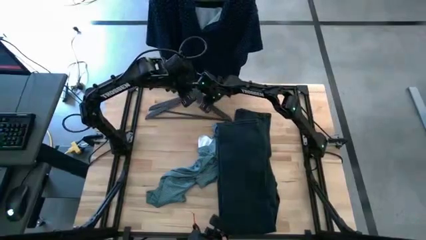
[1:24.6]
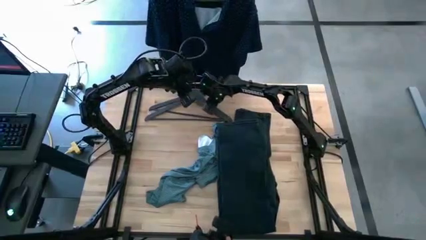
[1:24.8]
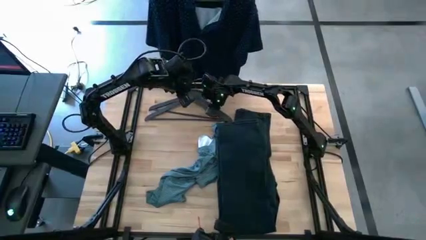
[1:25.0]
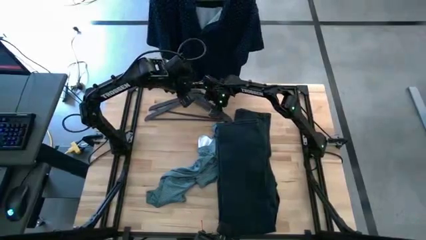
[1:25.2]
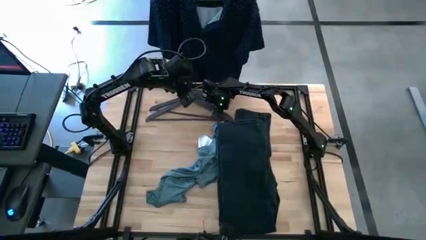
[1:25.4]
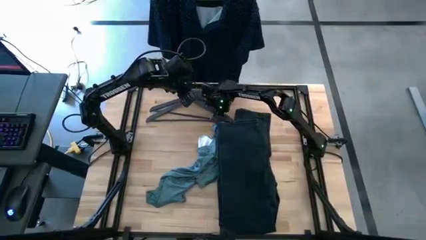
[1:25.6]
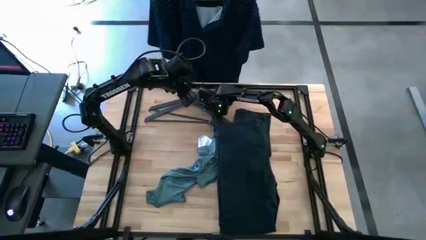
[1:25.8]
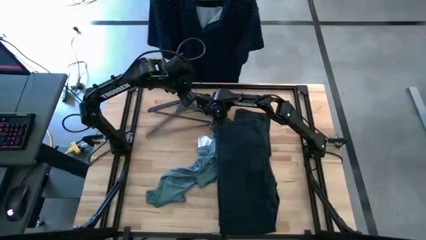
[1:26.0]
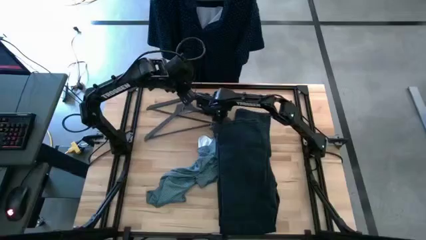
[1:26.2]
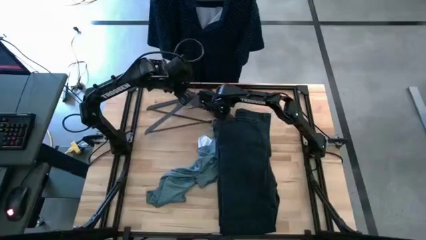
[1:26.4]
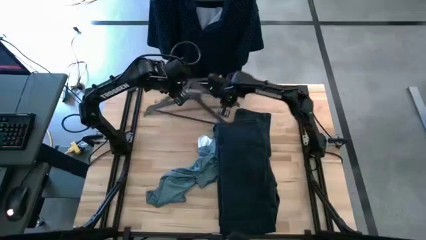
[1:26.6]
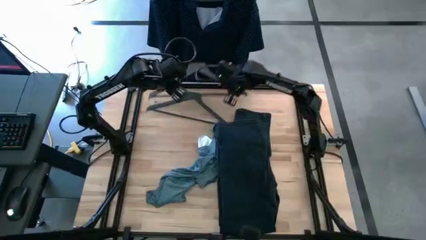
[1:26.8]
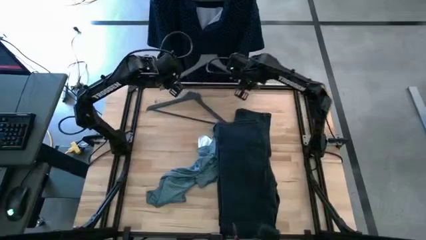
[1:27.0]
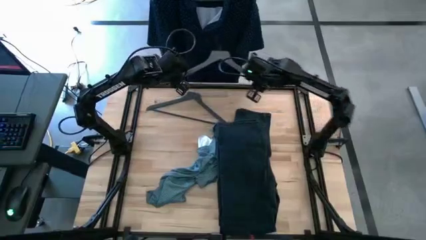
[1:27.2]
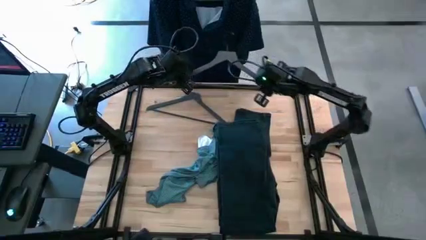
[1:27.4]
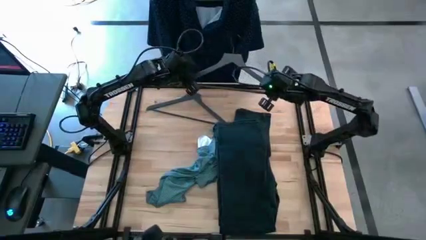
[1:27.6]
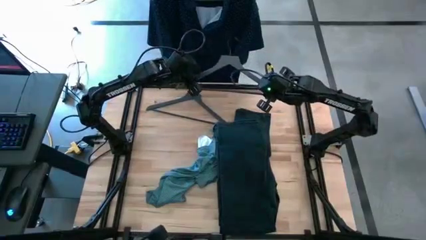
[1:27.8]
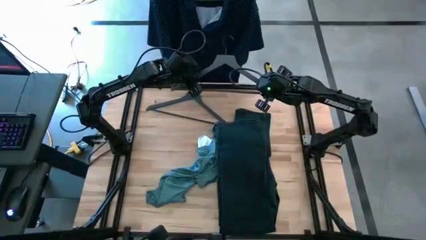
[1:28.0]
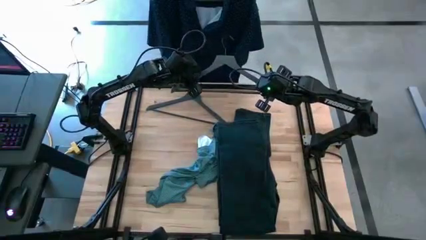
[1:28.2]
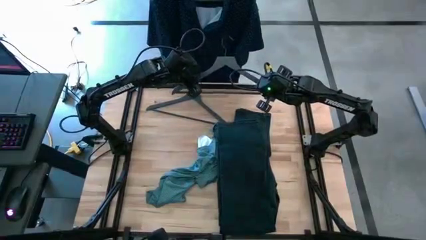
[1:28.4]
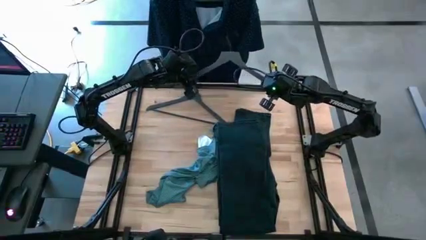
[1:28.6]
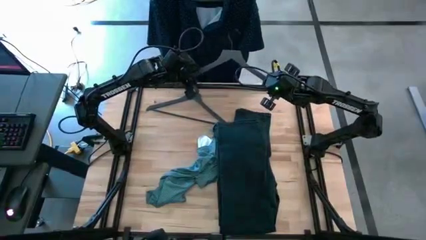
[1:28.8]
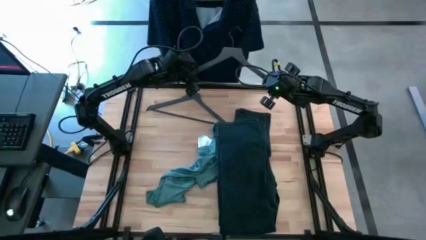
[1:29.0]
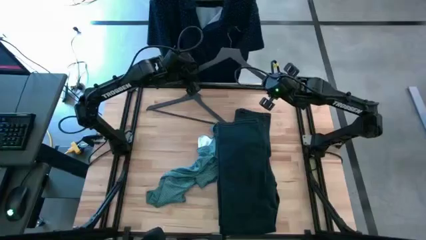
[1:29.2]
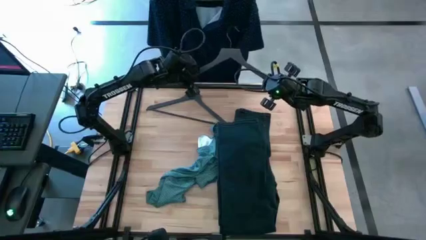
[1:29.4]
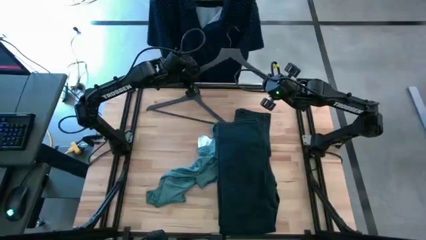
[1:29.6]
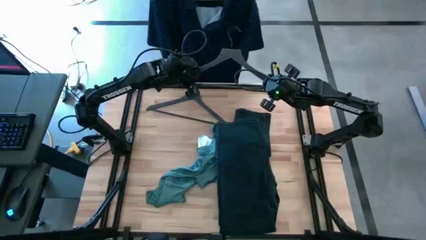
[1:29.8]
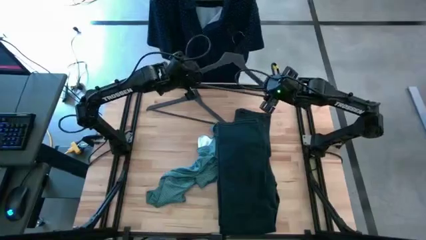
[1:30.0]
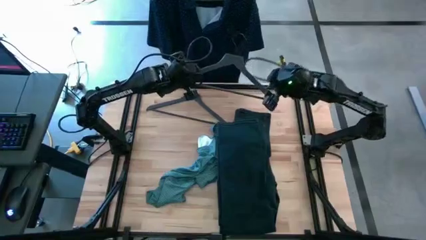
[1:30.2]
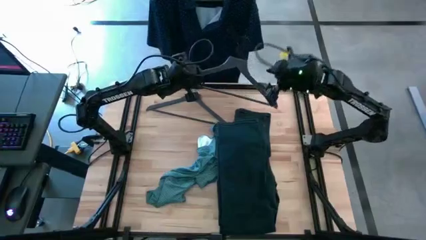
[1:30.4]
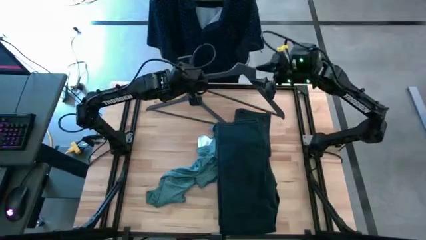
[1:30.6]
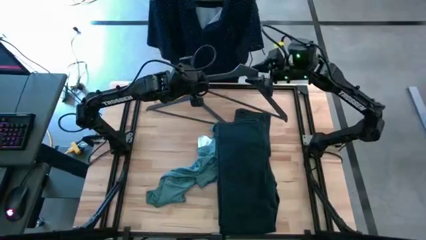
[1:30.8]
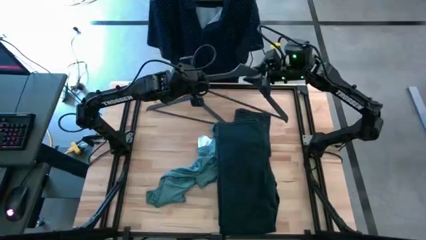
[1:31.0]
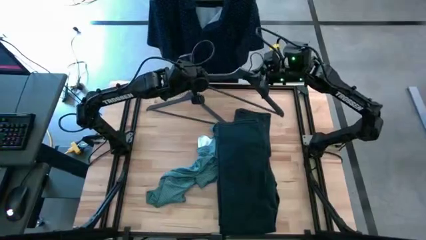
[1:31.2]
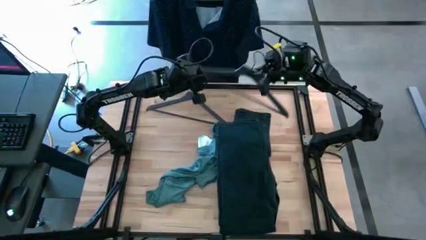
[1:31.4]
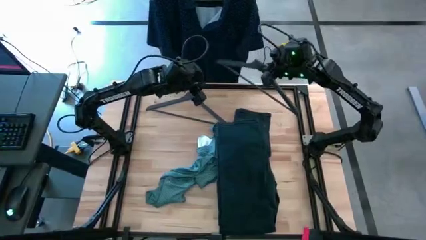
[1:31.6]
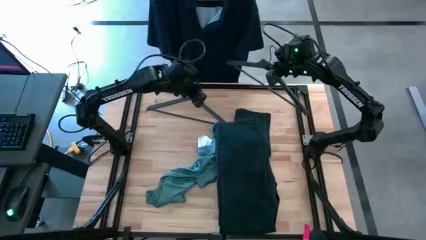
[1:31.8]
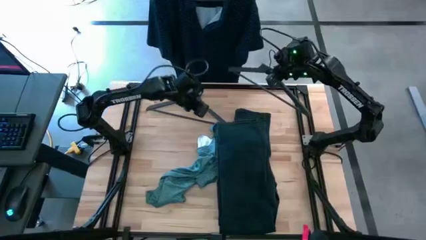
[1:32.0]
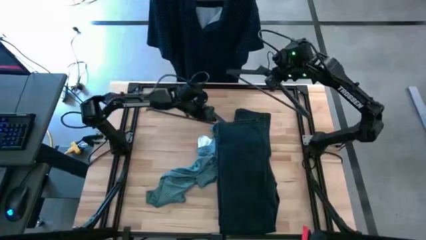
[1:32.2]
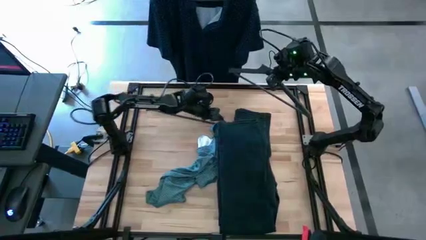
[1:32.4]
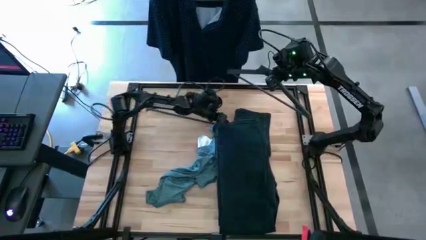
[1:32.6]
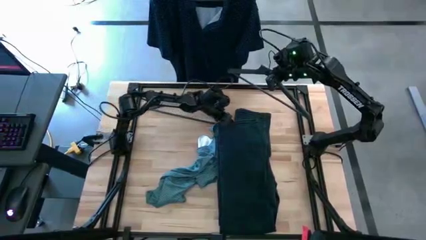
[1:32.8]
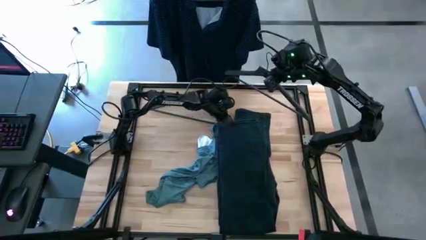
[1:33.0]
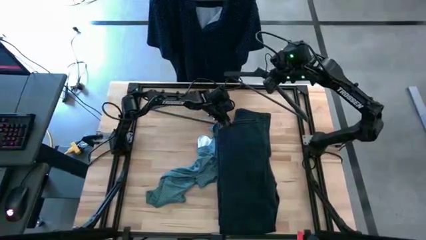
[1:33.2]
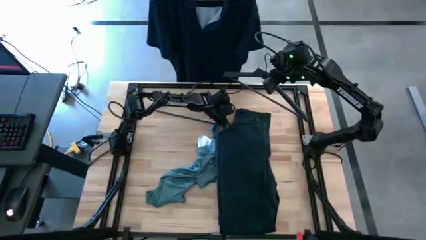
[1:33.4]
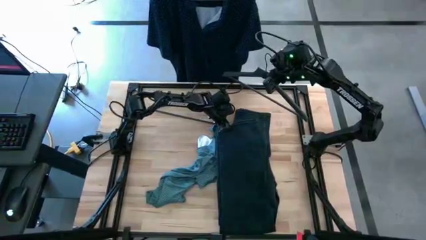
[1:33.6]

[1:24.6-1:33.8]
Task: Hang clothes
Insert the hanger into the blue pants

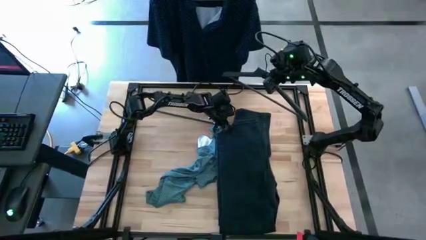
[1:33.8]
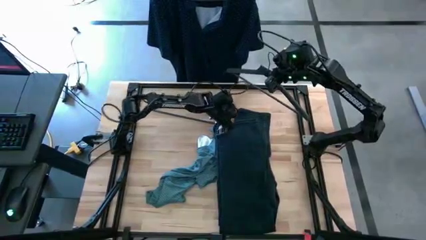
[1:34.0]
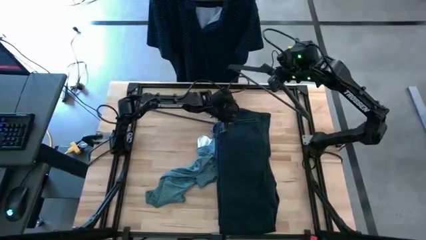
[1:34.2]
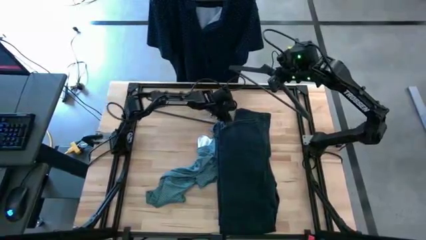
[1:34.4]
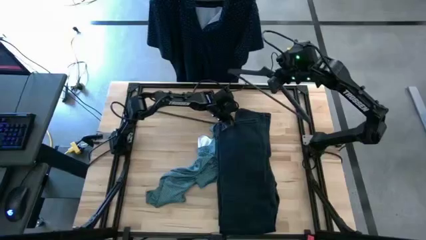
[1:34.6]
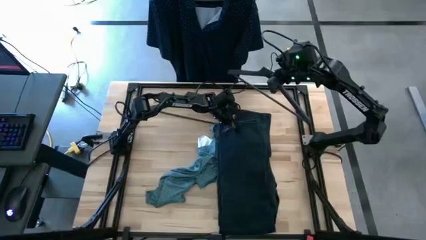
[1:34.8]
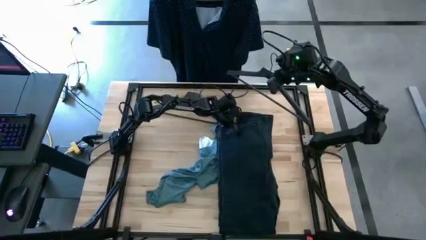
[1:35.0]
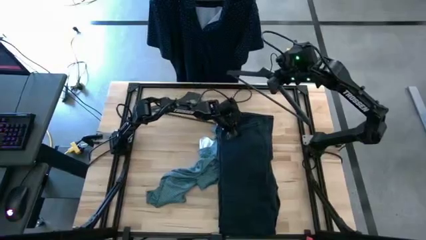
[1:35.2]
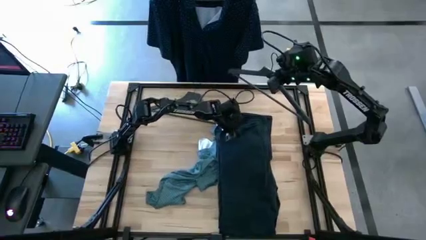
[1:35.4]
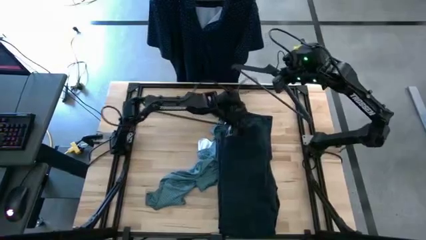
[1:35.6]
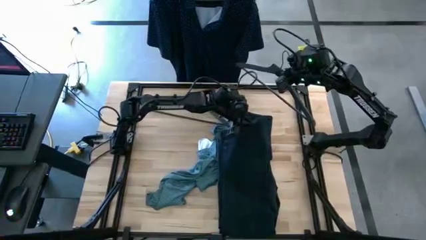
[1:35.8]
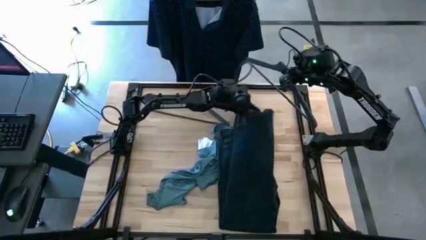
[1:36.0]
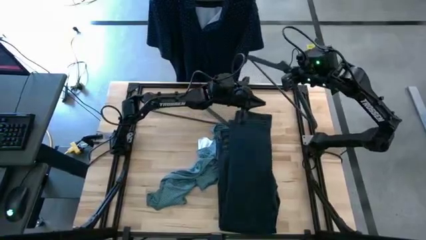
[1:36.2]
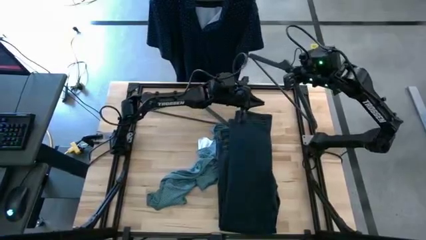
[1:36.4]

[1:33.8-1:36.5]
Insert the hanger into the blue pants
